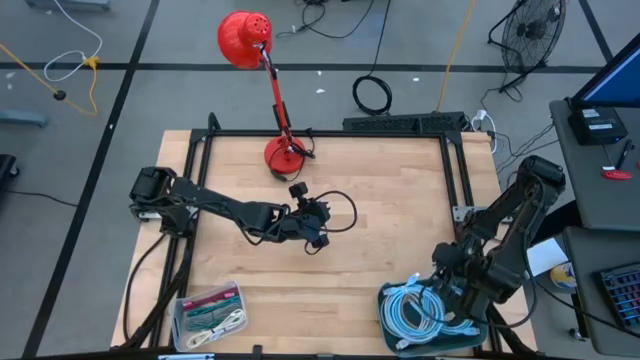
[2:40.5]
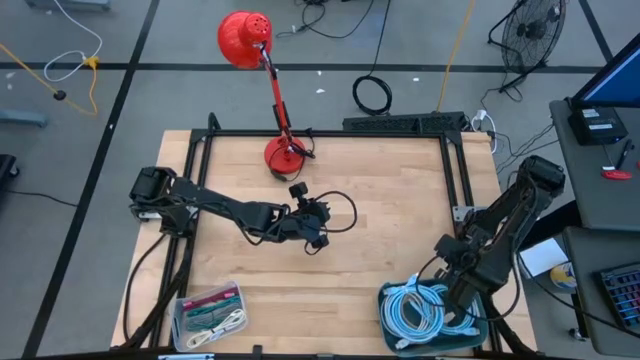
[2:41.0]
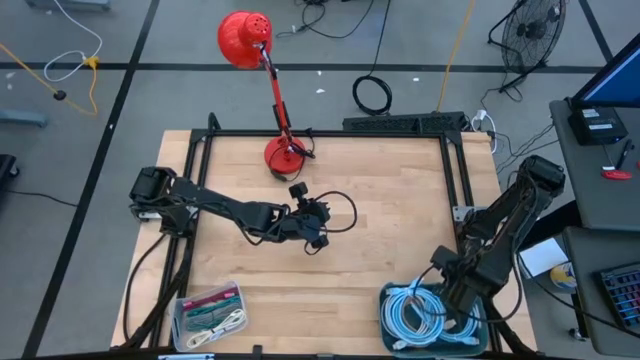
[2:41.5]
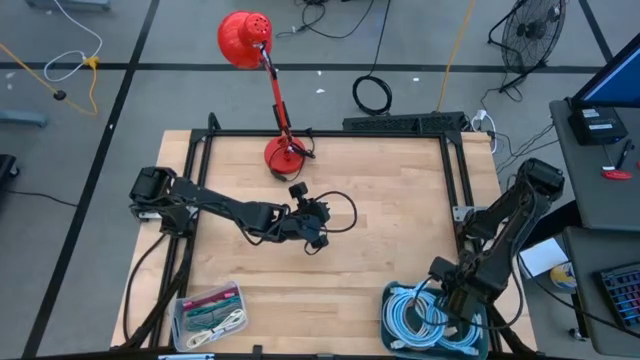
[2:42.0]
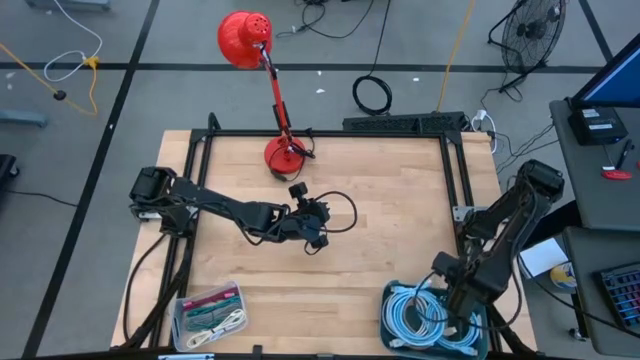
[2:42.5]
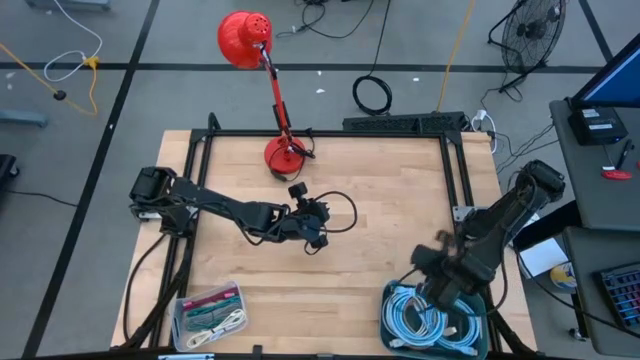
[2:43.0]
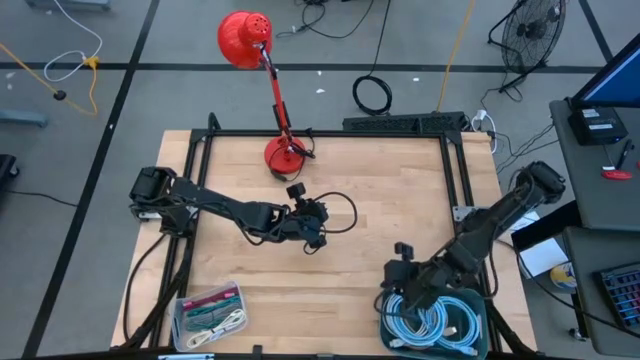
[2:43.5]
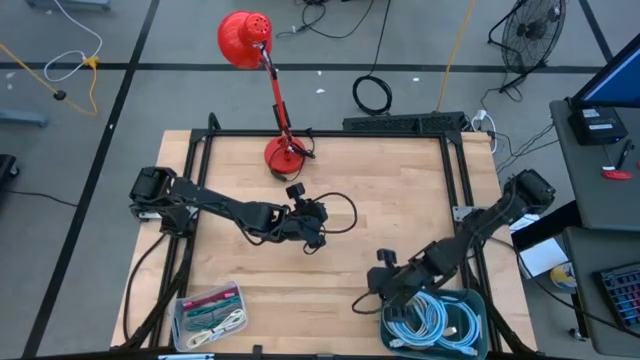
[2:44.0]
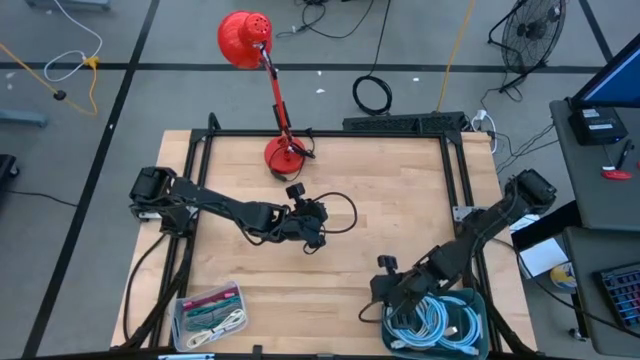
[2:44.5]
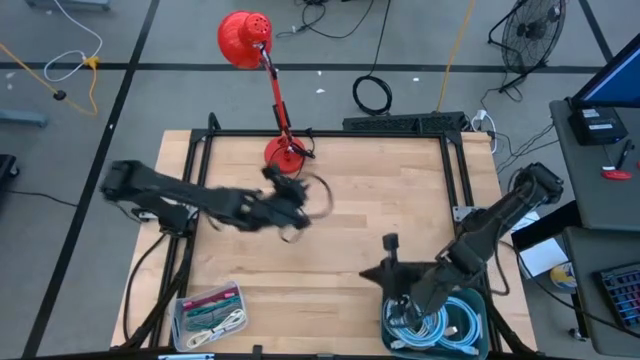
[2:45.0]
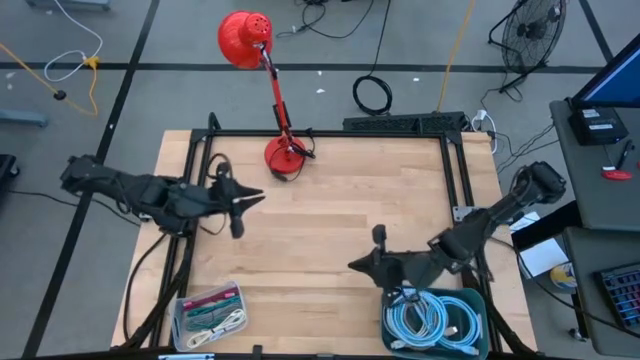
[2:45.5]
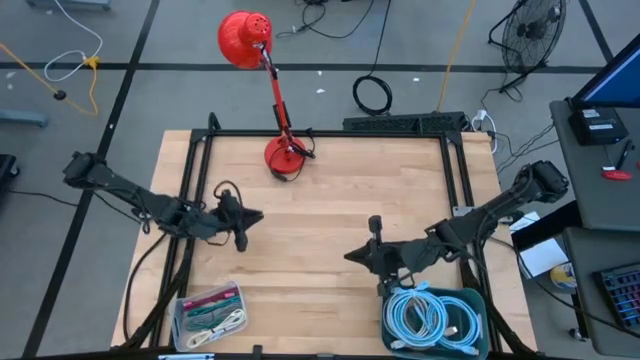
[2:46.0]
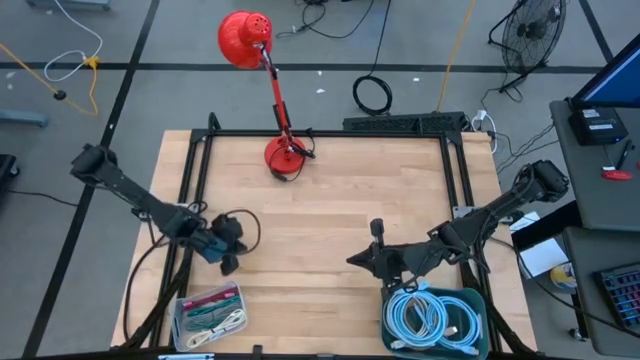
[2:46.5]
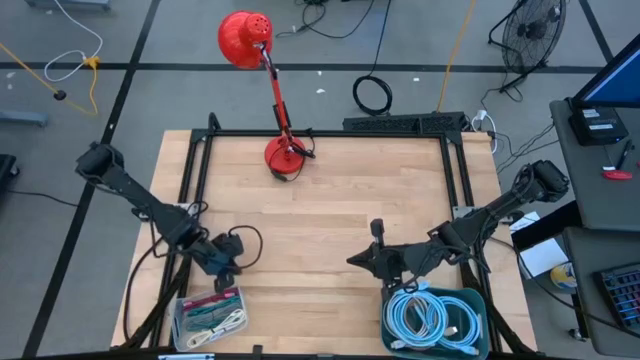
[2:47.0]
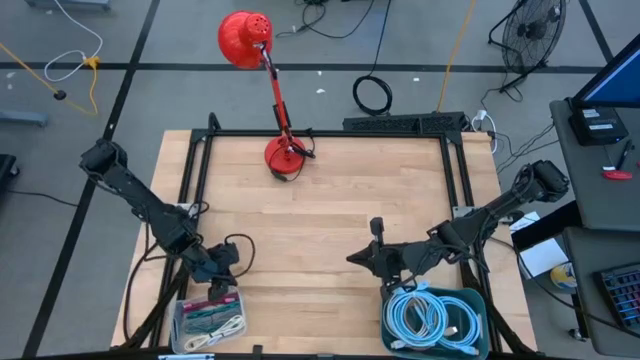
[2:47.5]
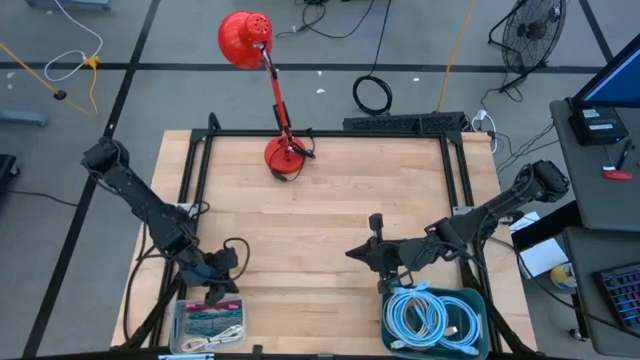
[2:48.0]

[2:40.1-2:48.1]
Task: Pick & Place USB Port
Adjust the bins

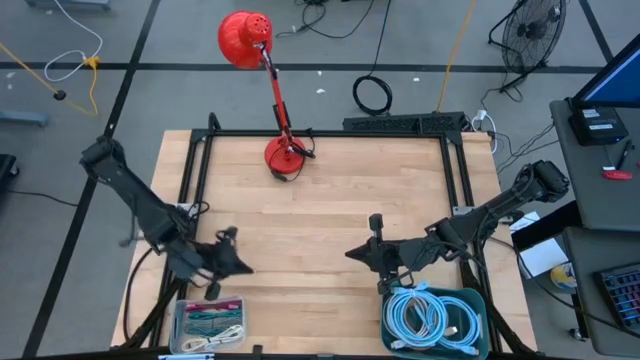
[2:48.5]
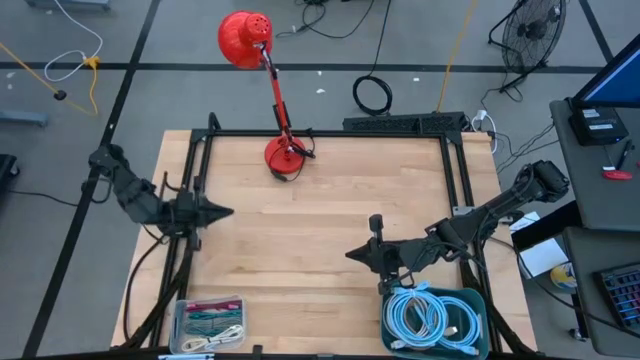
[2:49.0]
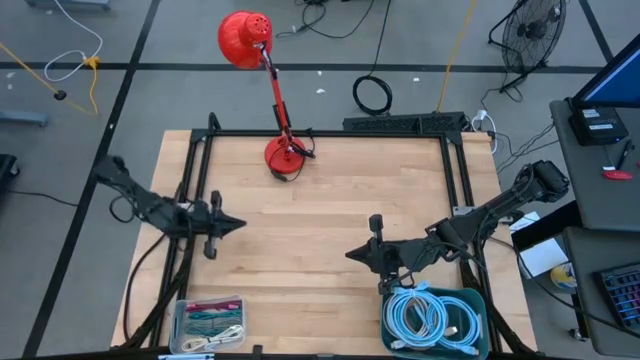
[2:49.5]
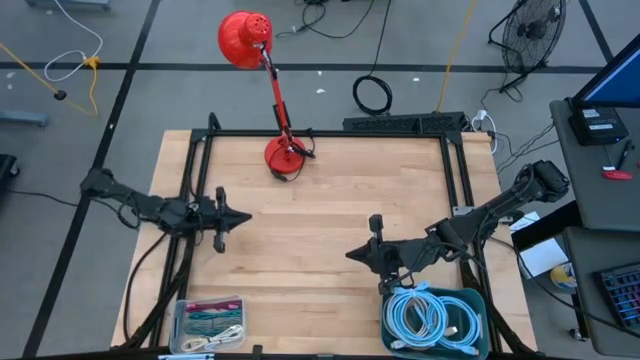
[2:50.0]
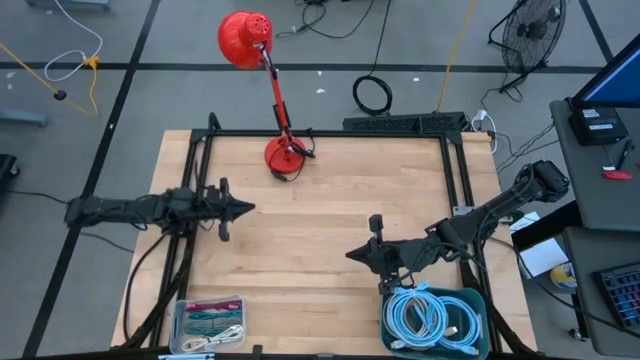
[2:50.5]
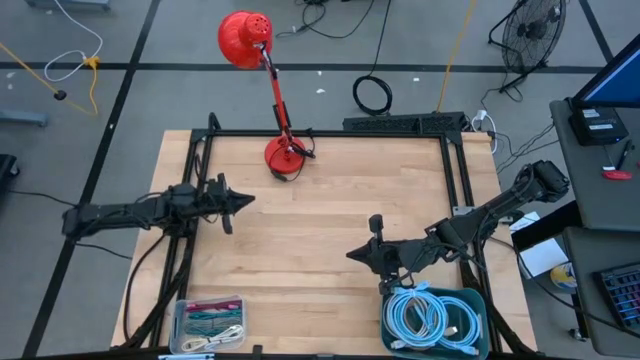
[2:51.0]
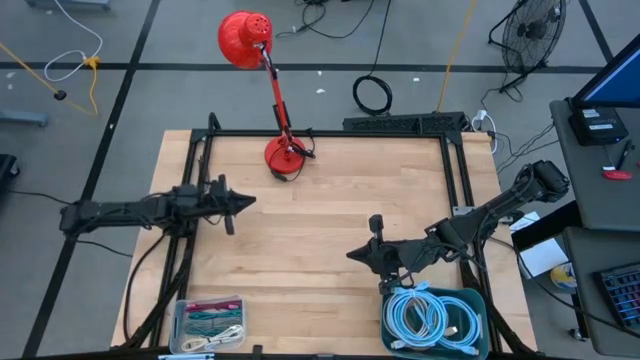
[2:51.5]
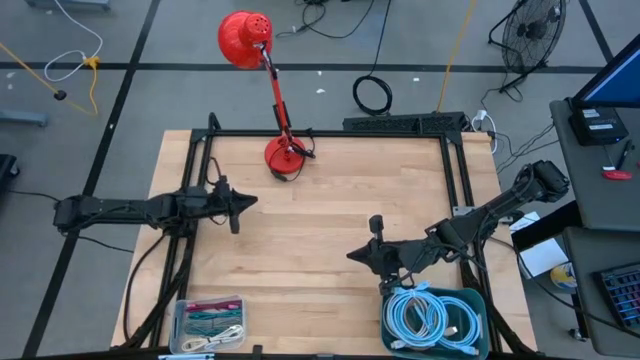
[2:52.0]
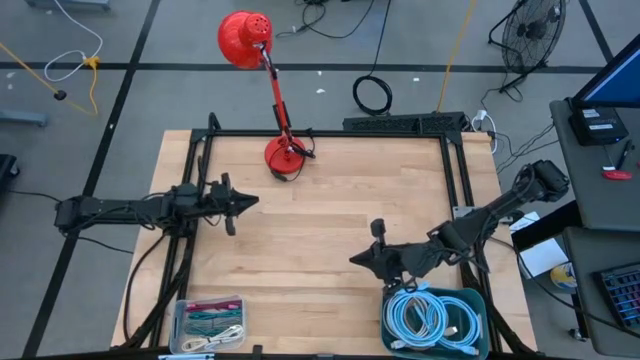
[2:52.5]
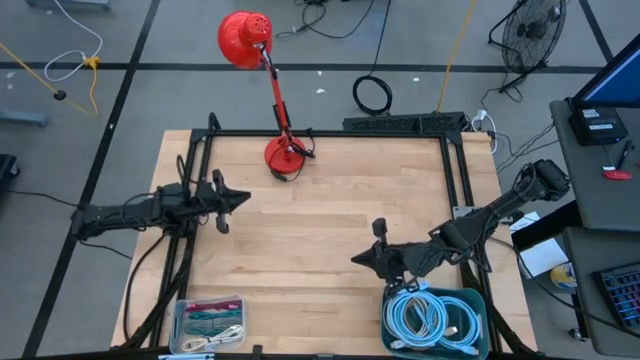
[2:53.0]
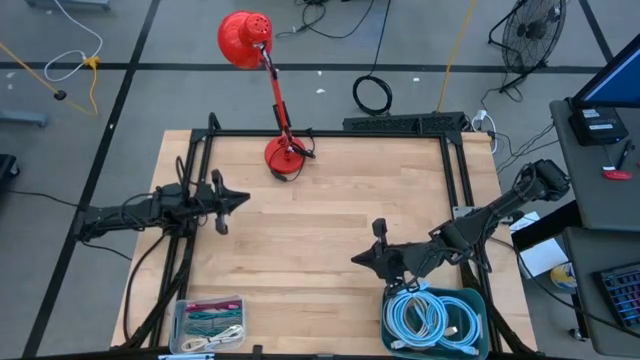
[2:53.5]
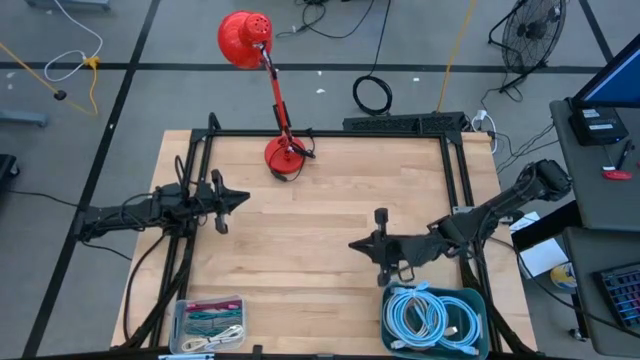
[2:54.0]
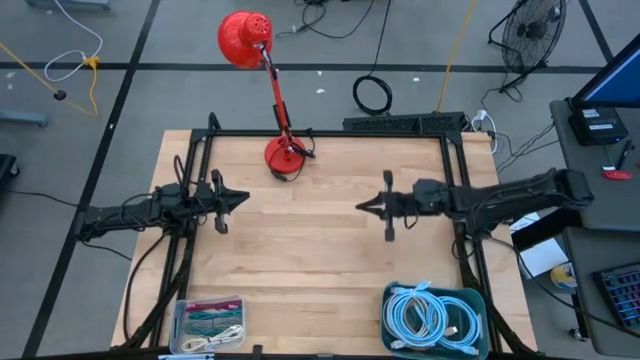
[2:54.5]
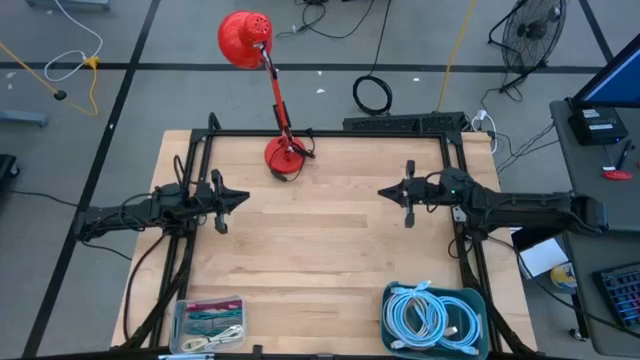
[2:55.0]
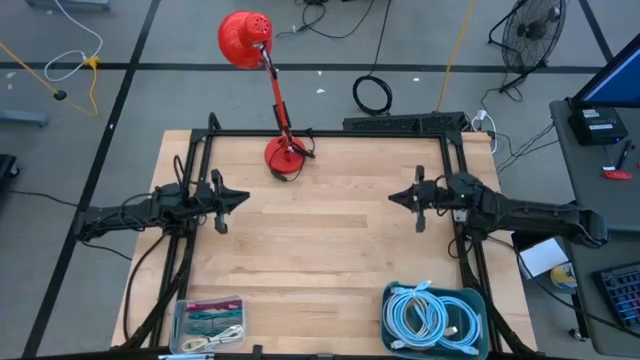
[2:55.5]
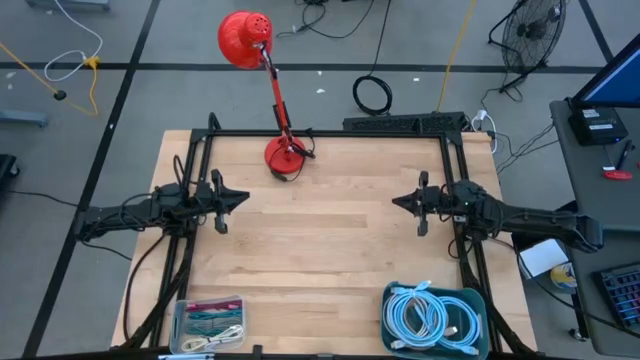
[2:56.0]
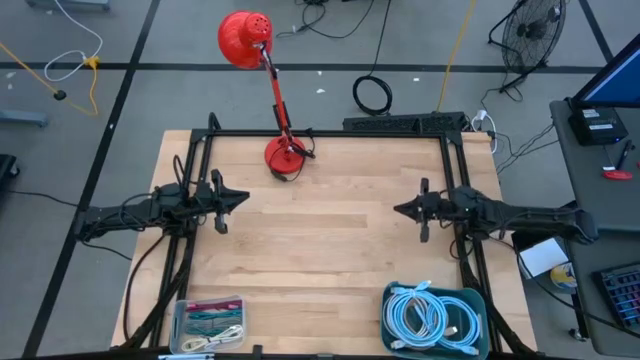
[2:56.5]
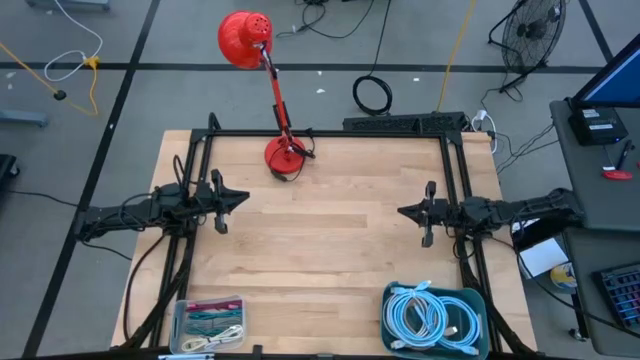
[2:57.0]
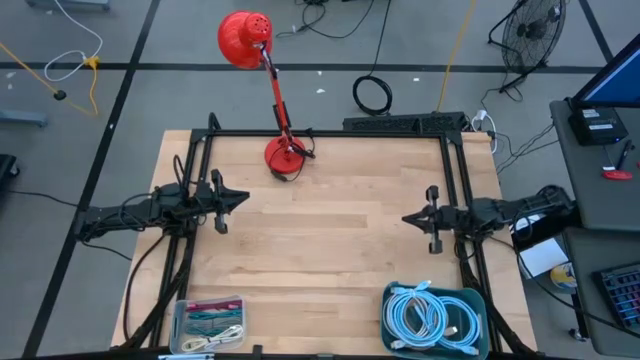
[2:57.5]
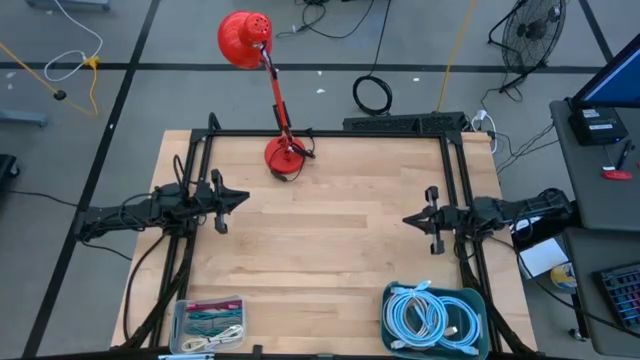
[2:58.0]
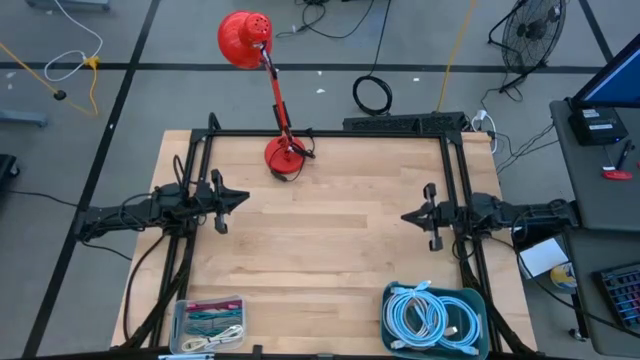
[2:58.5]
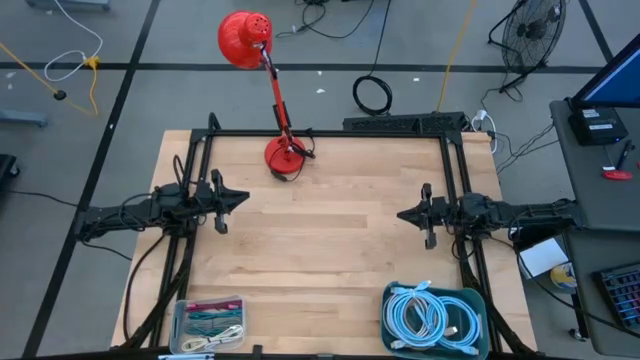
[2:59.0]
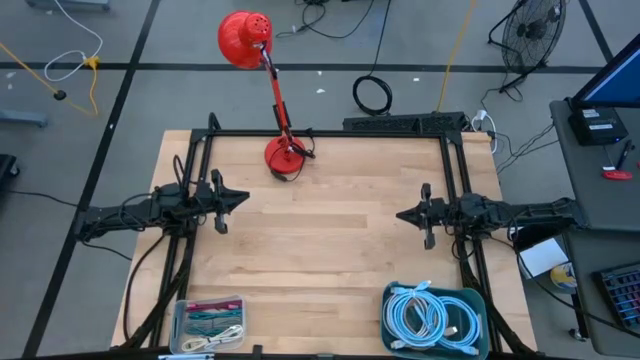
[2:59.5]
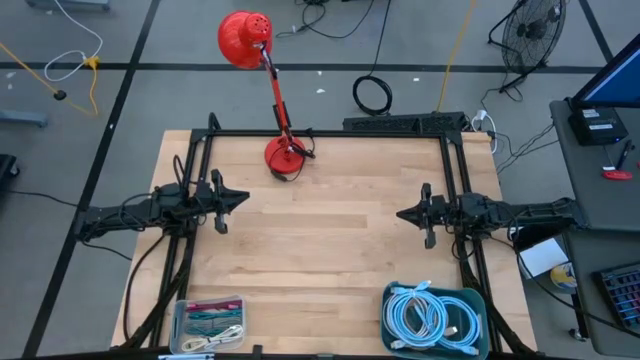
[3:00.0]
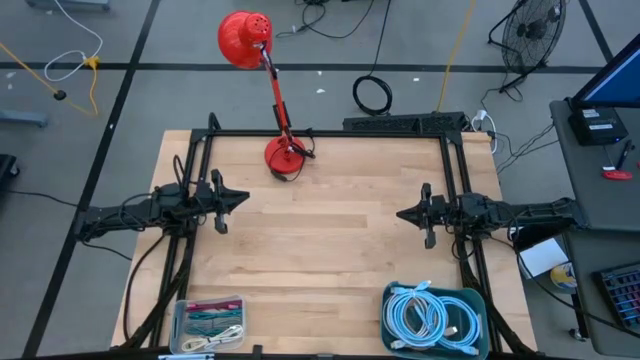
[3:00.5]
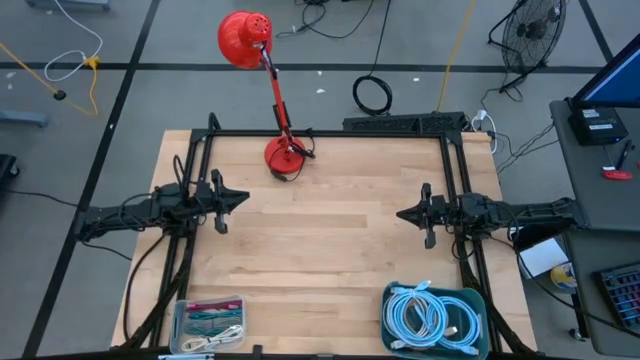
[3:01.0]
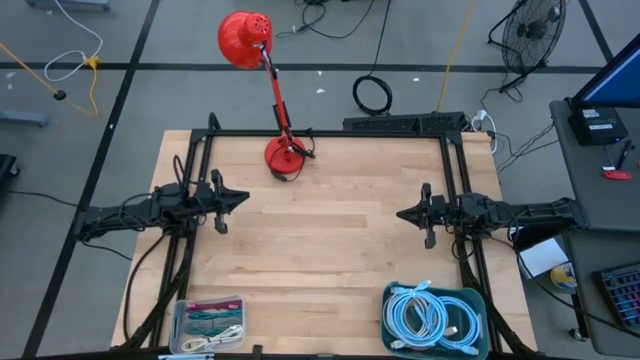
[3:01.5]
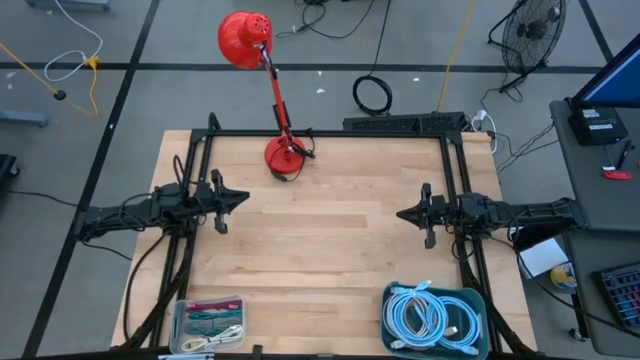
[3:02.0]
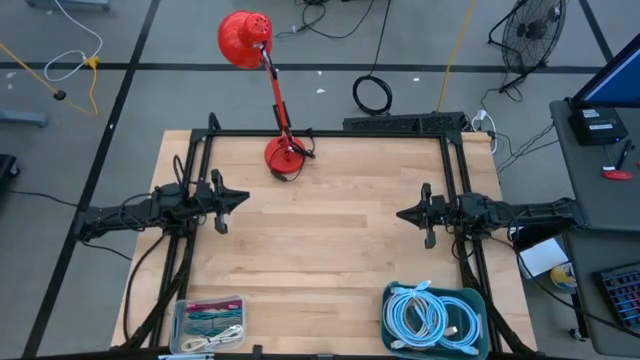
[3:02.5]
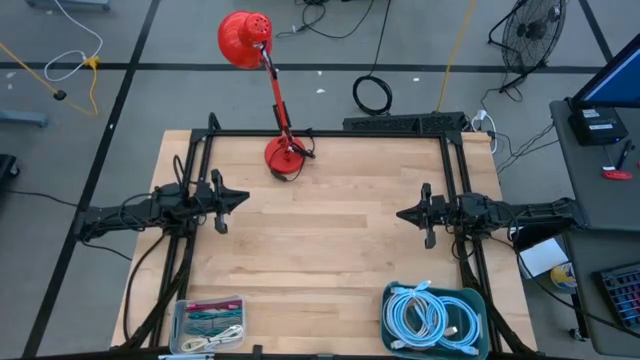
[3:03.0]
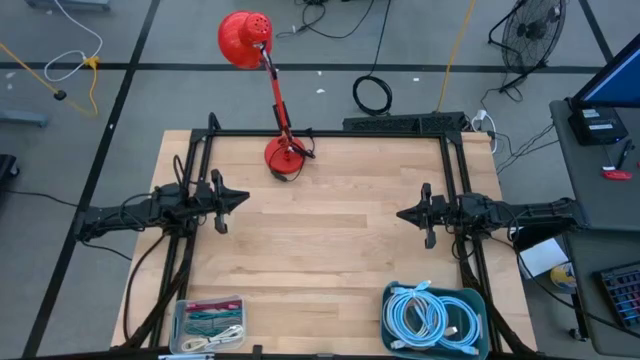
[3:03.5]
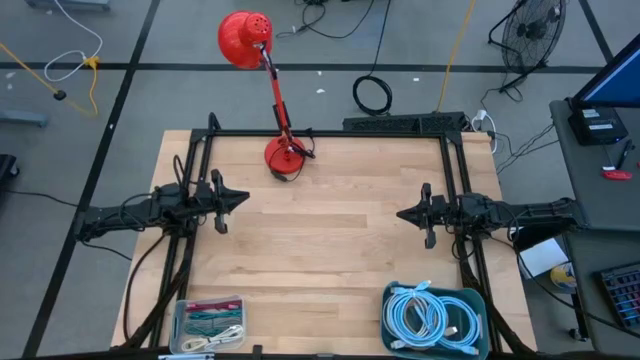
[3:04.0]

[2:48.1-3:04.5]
Return to Home Position
